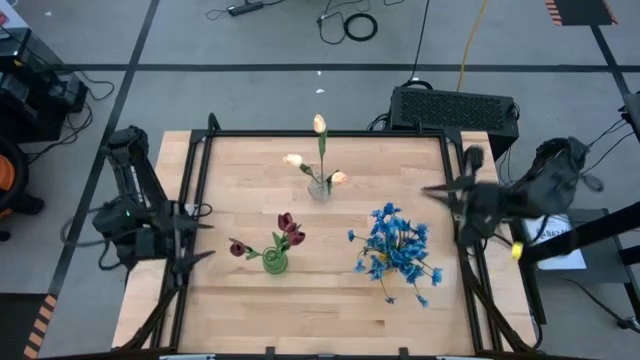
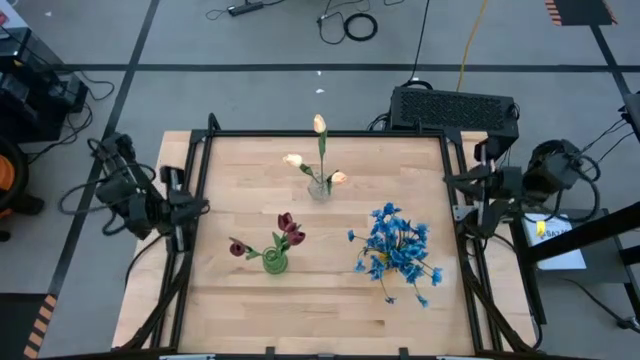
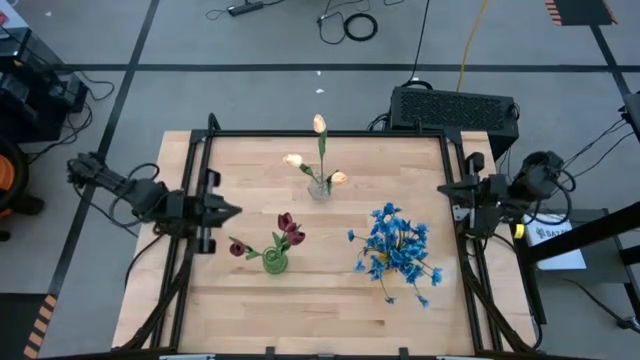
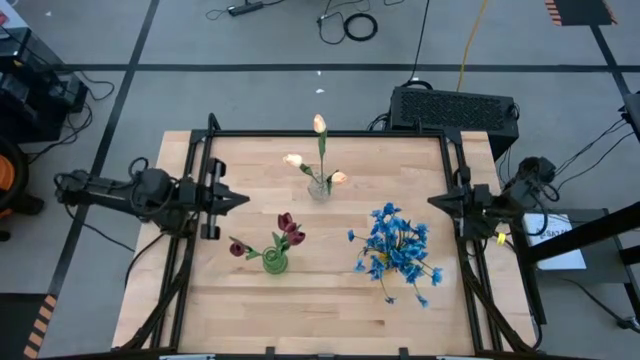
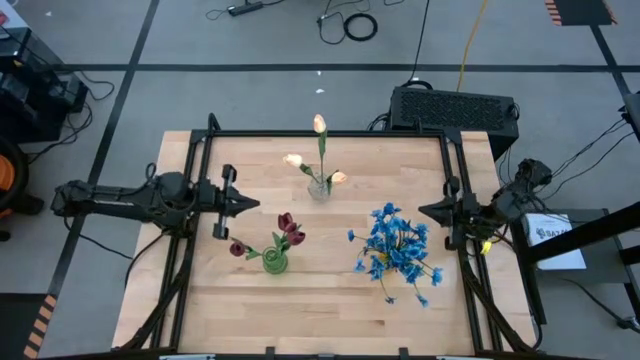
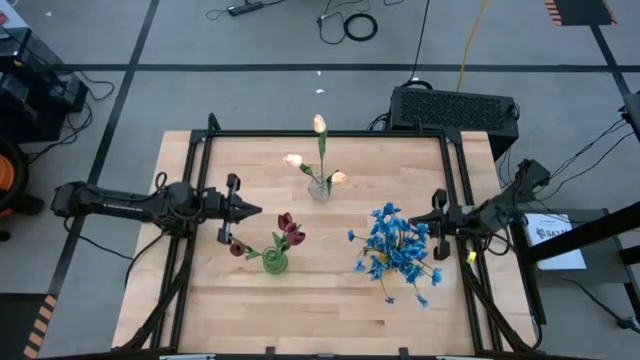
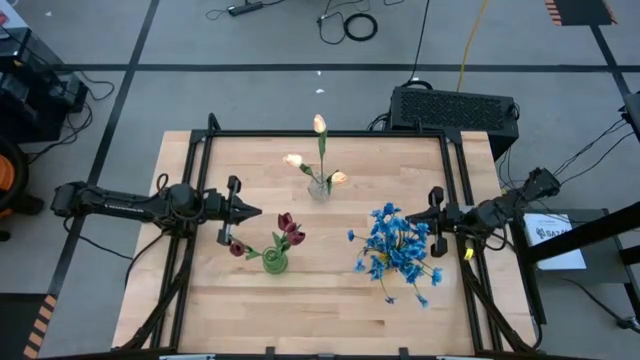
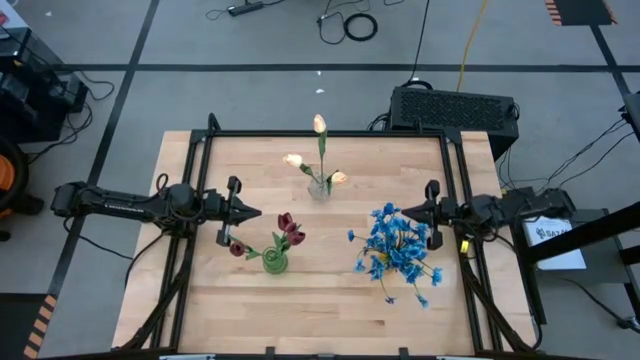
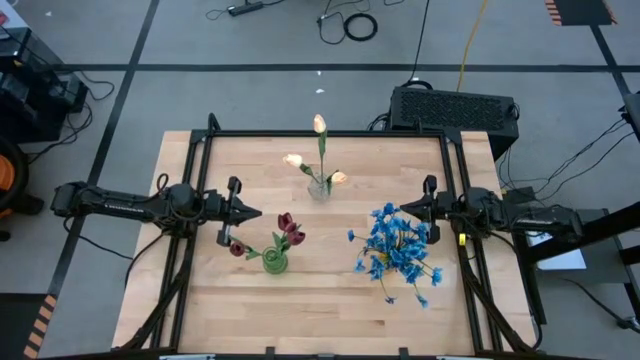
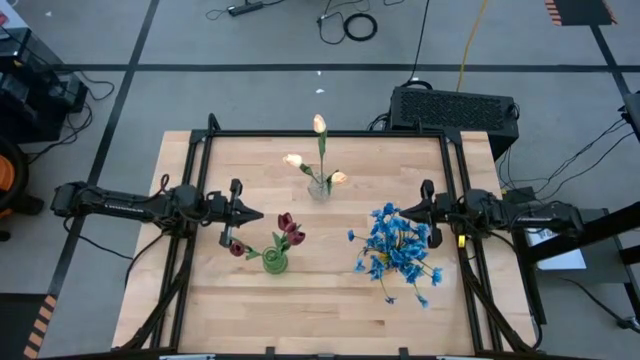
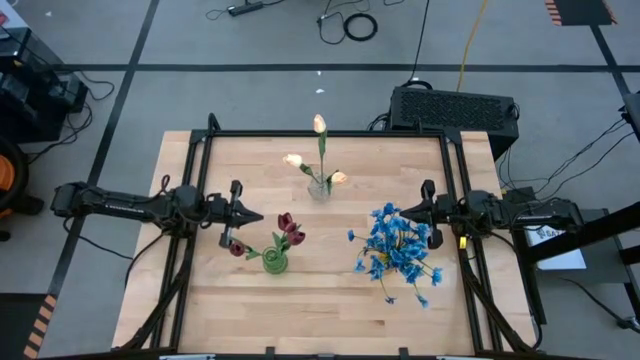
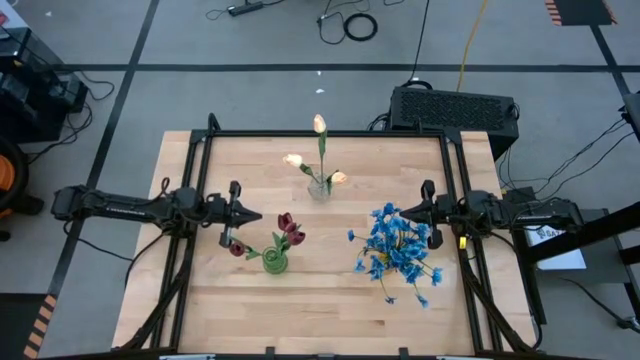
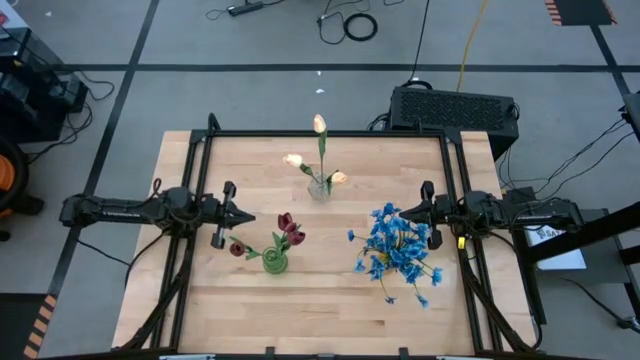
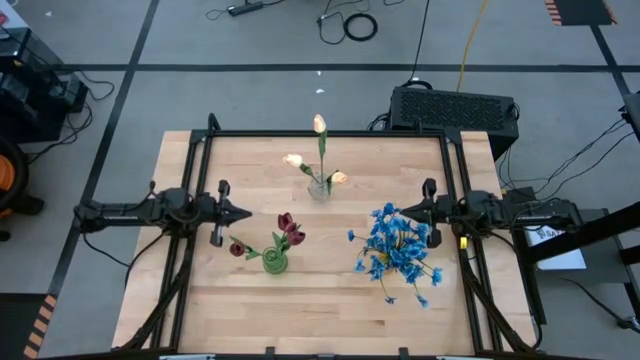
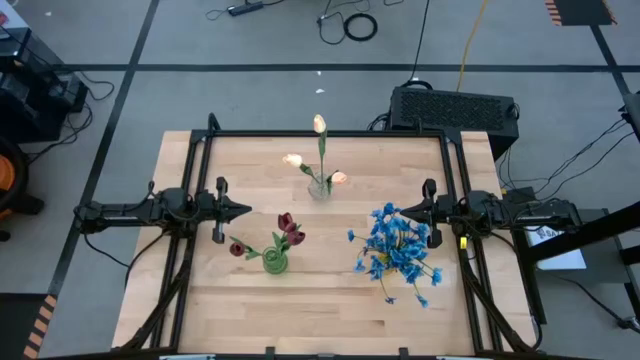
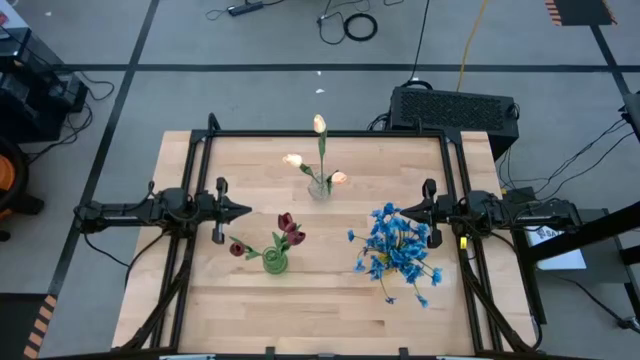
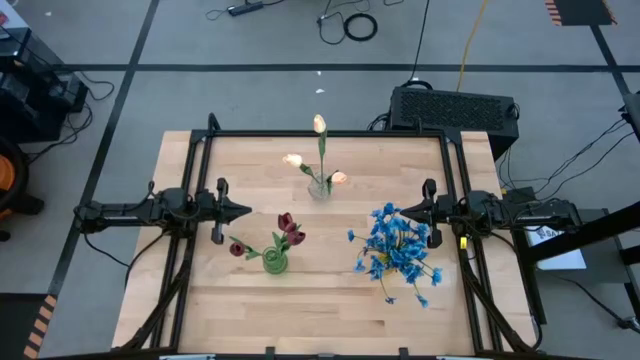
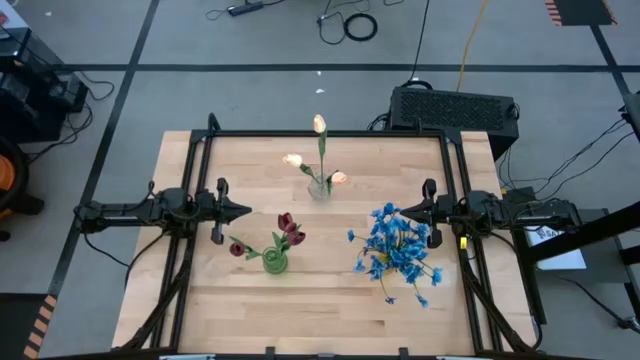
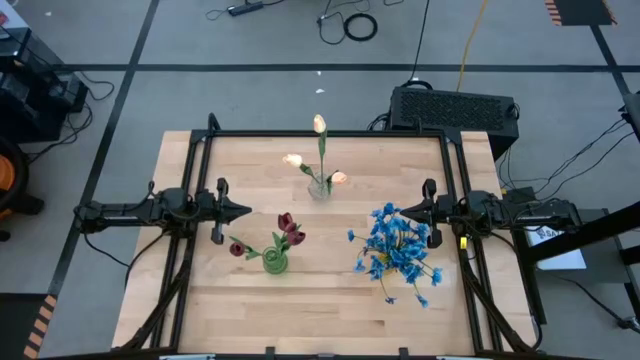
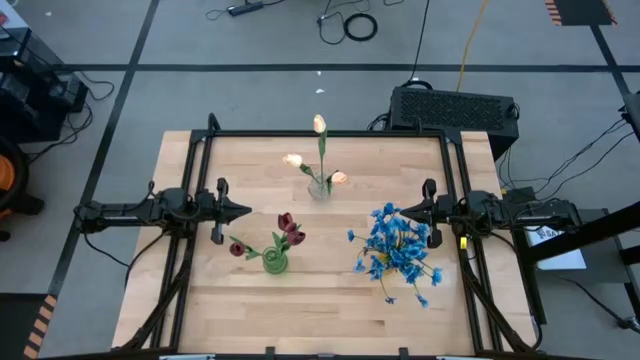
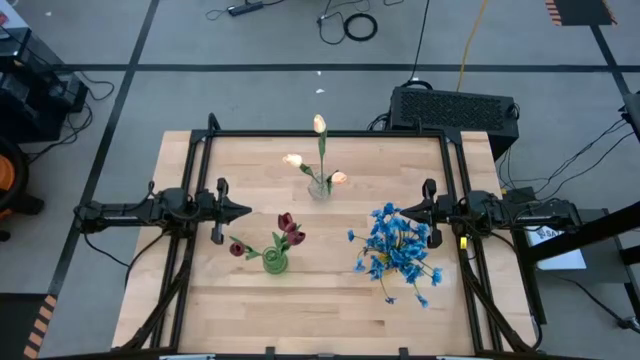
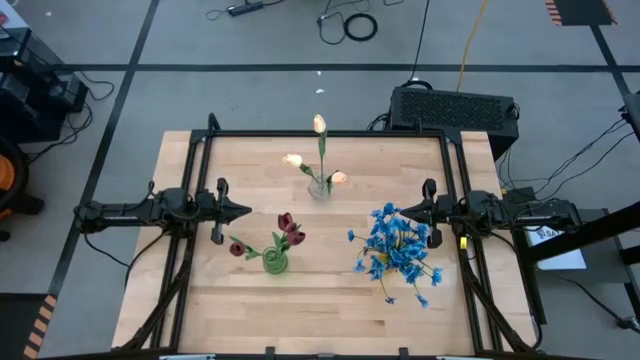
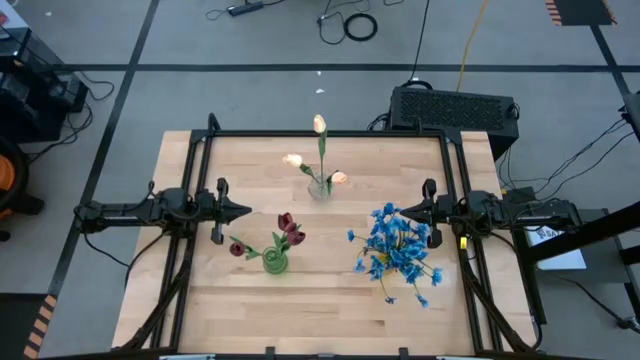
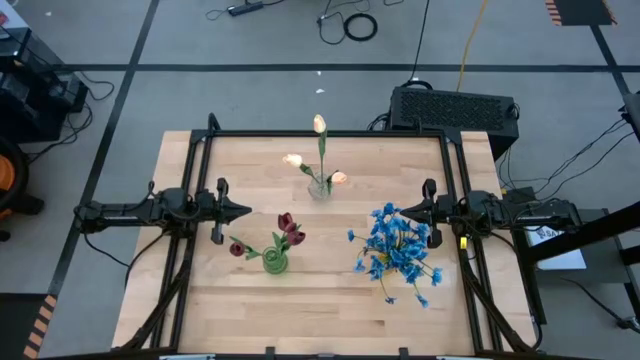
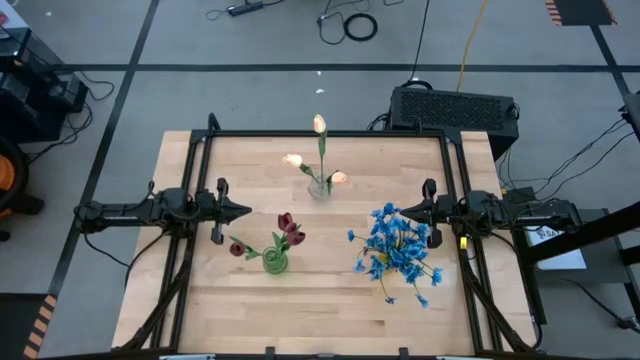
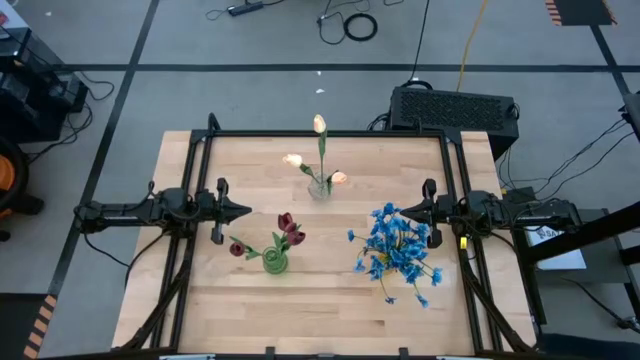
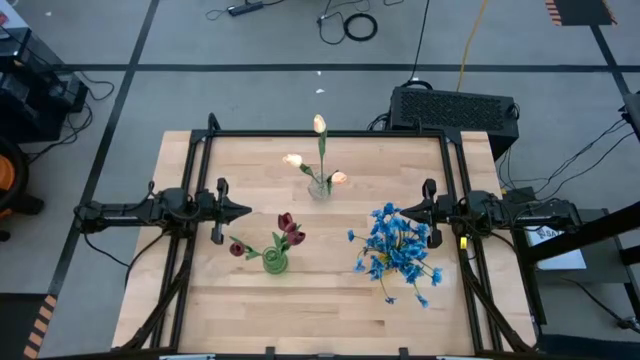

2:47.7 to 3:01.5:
Task: Sort flowers into vase by color
Return to Home Position

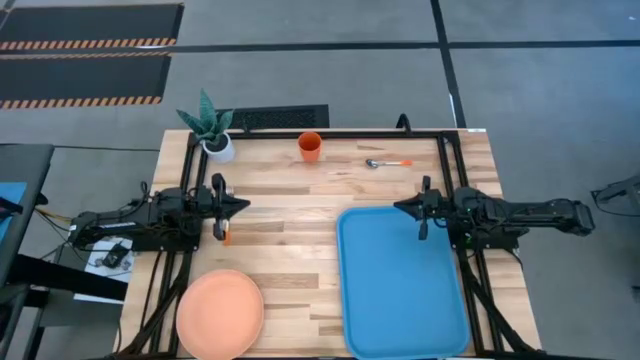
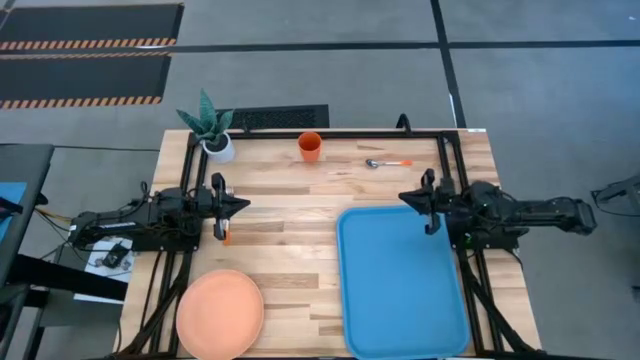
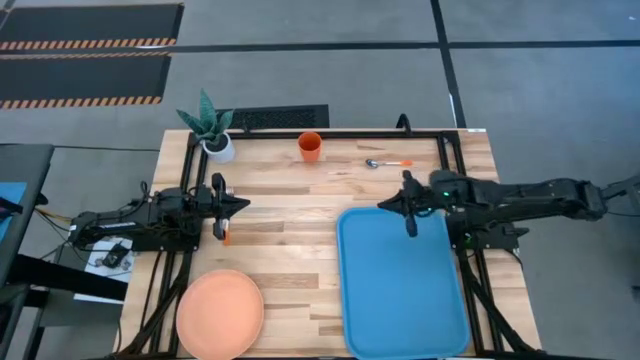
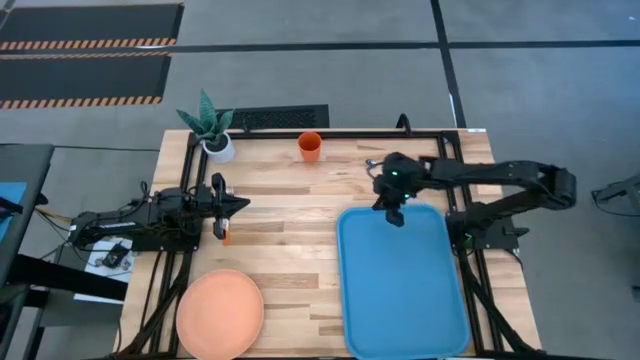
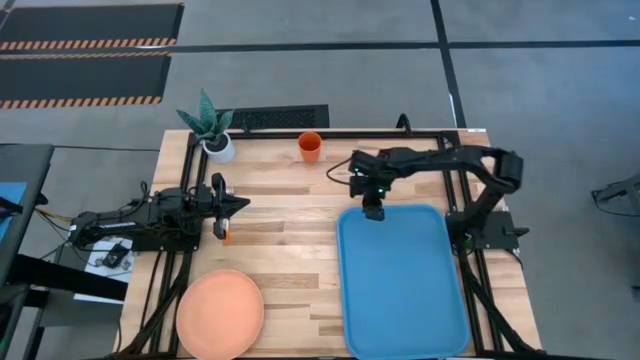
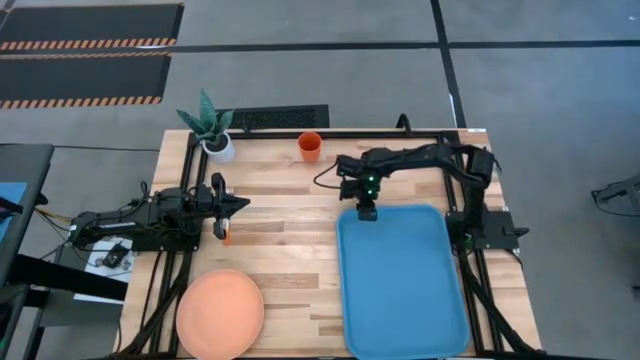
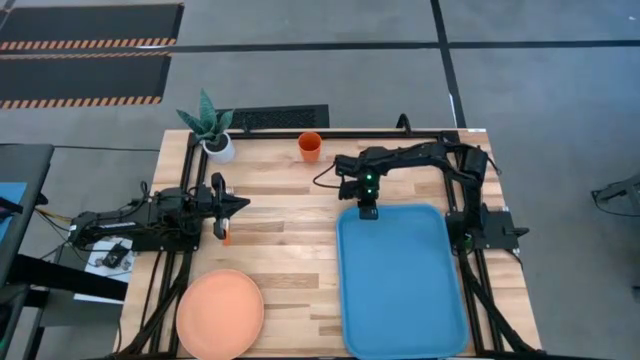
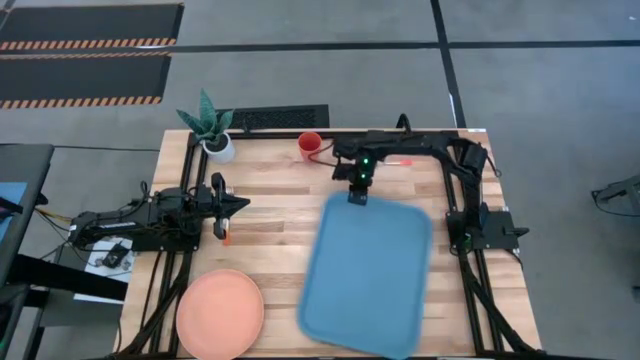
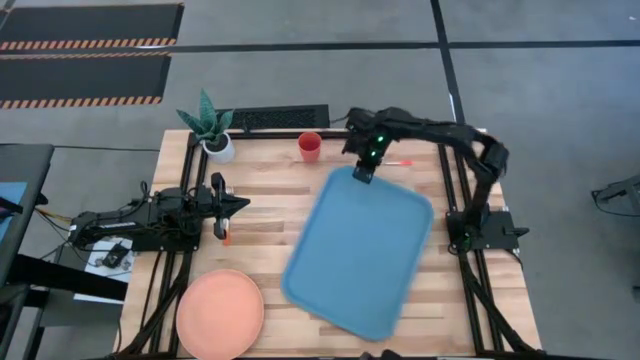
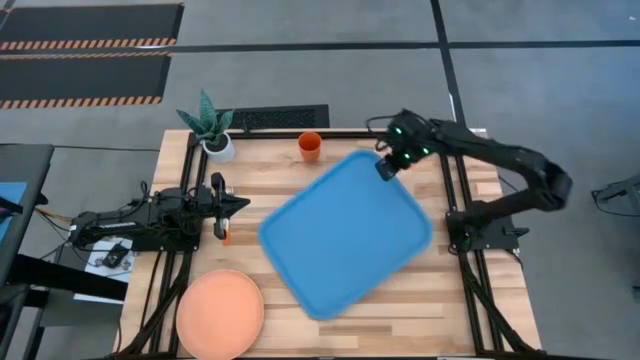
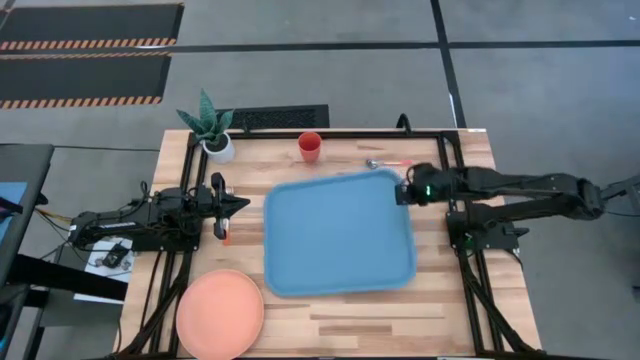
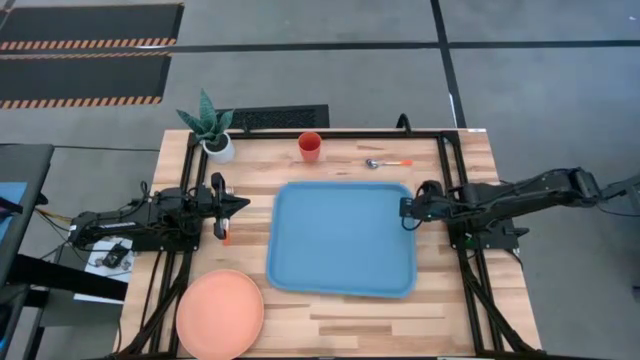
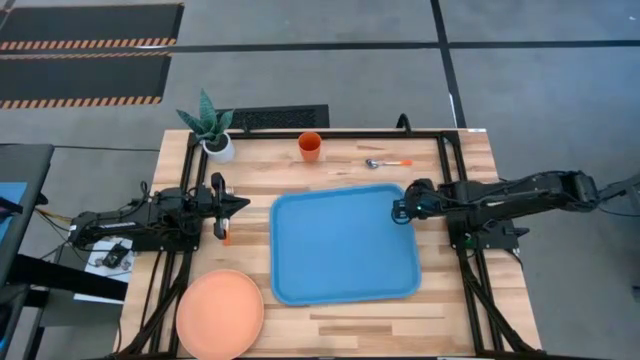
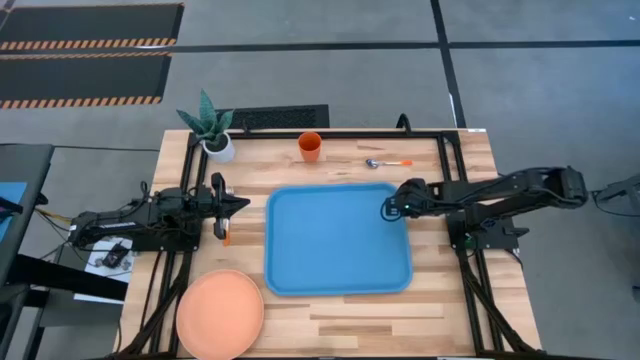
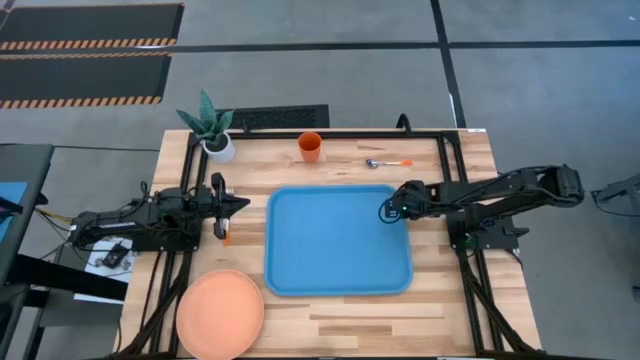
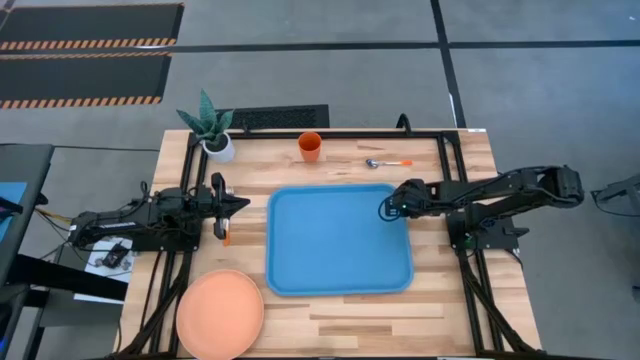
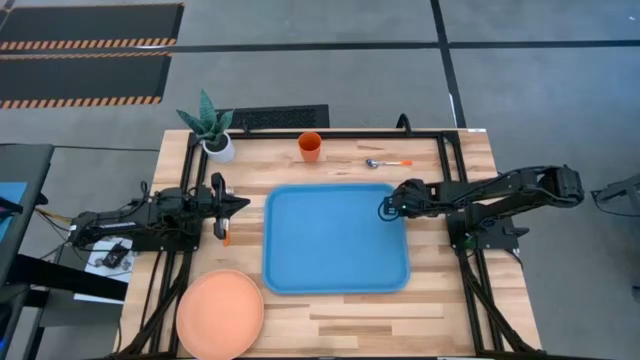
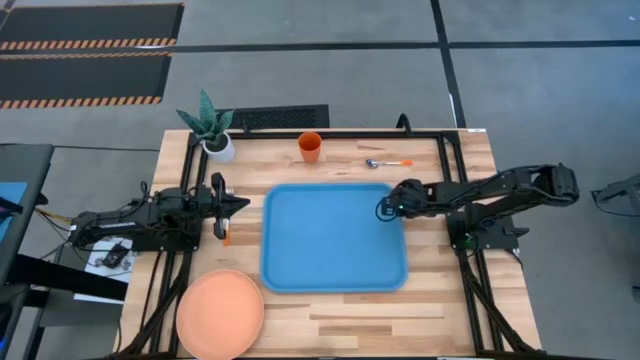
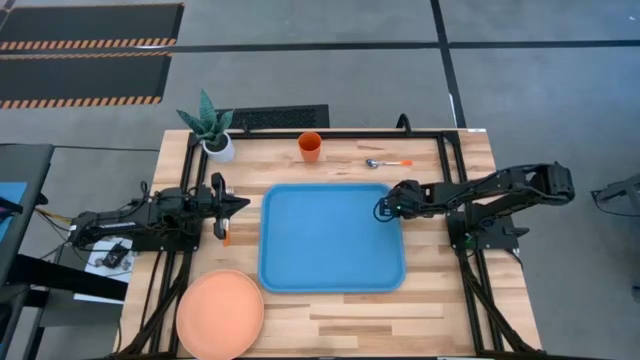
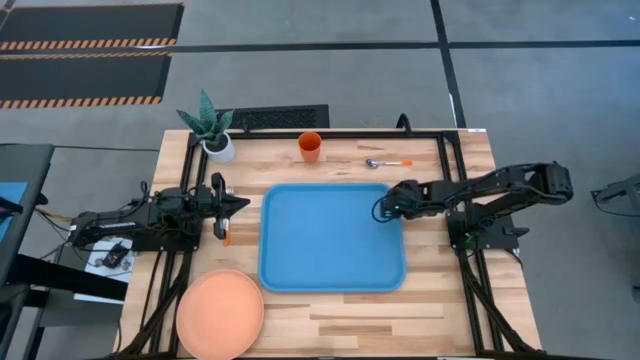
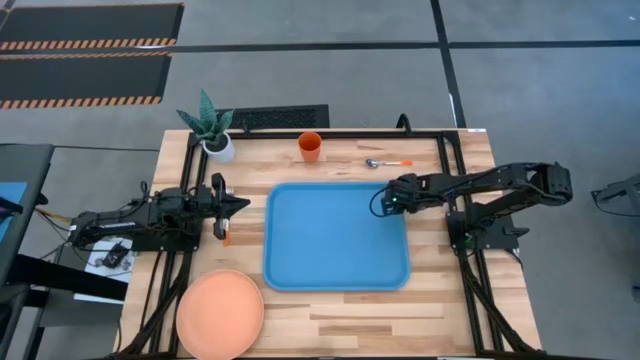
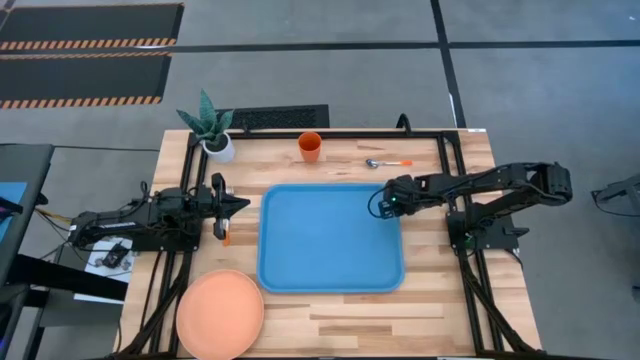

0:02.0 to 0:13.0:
Task: Pick and place plate/cup/fork/spoon on tray
Prepare the blue tray
